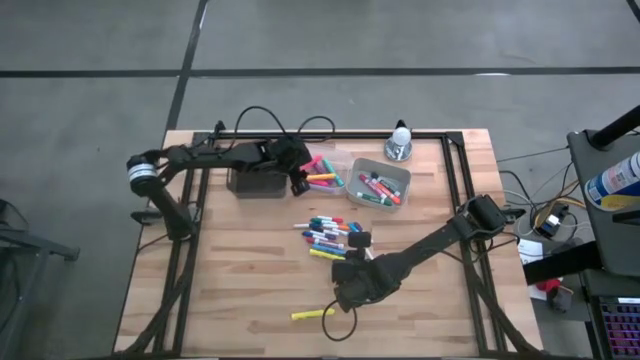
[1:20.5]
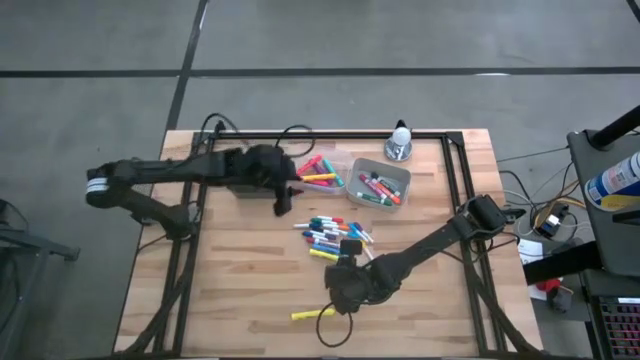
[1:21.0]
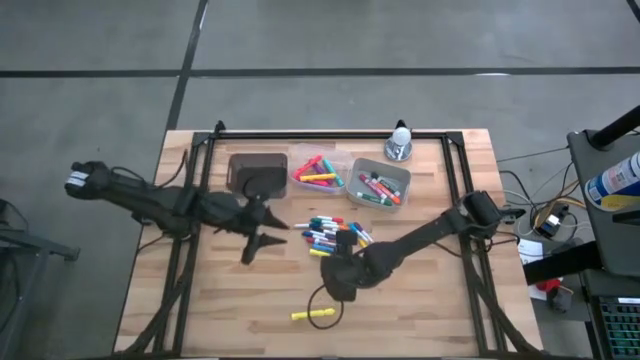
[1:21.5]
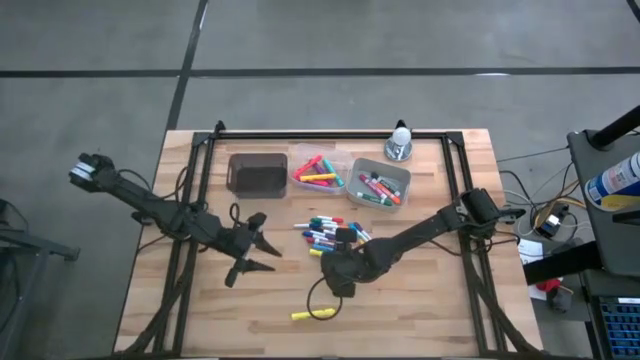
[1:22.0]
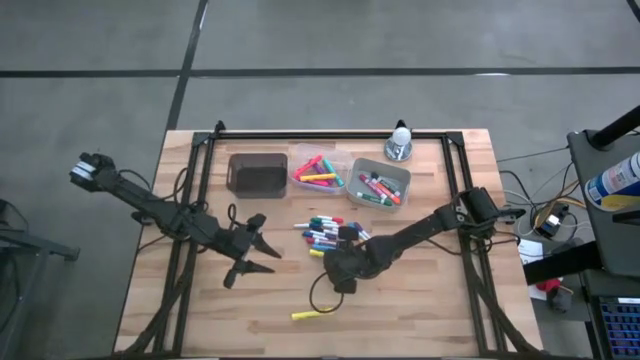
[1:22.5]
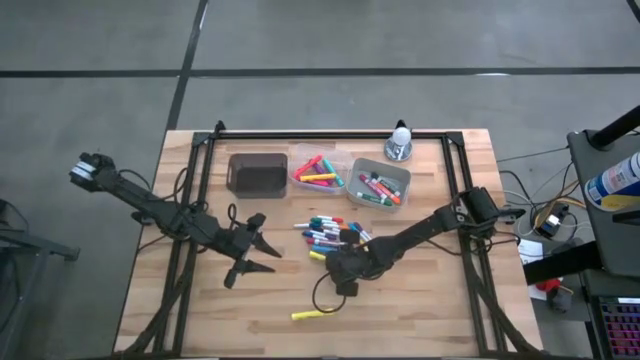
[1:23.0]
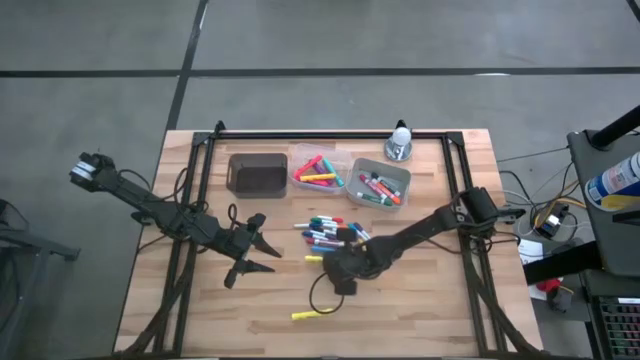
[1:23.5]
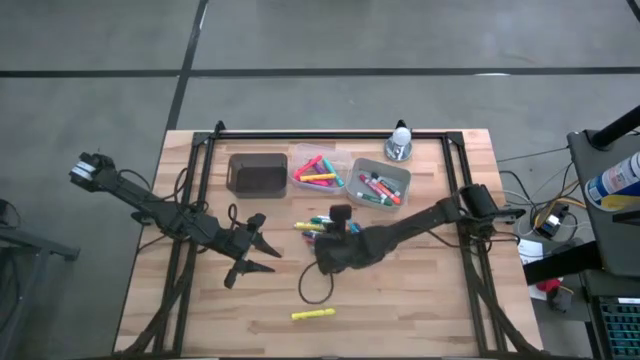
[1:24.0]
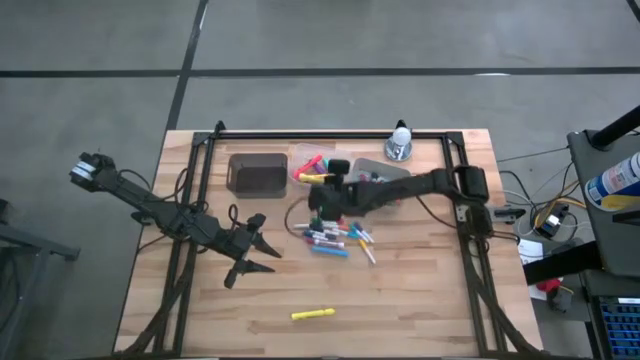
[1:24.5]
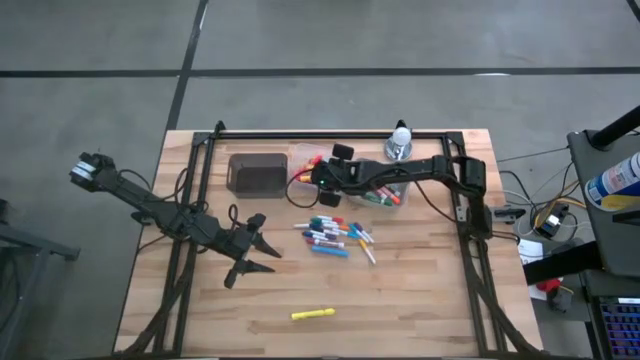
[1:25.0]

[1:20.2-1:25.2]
Task: Pick & Place Markers
Put the yellow highlighter into the transparent bin

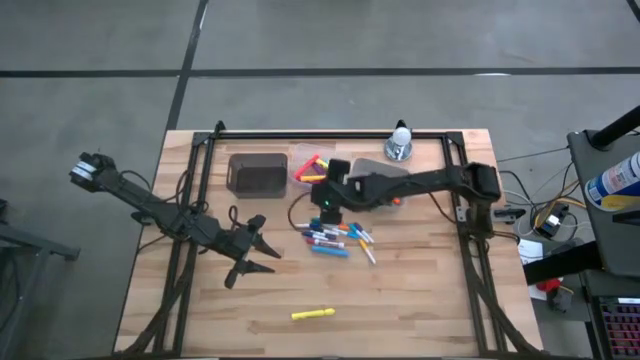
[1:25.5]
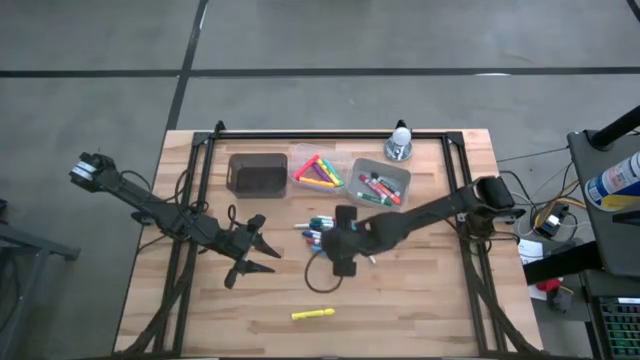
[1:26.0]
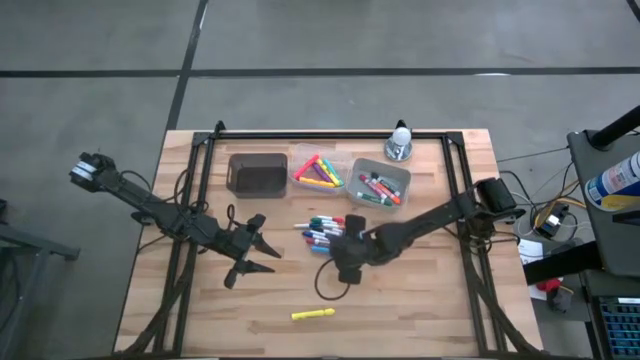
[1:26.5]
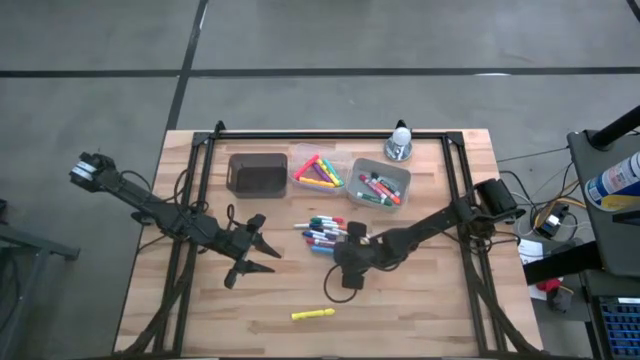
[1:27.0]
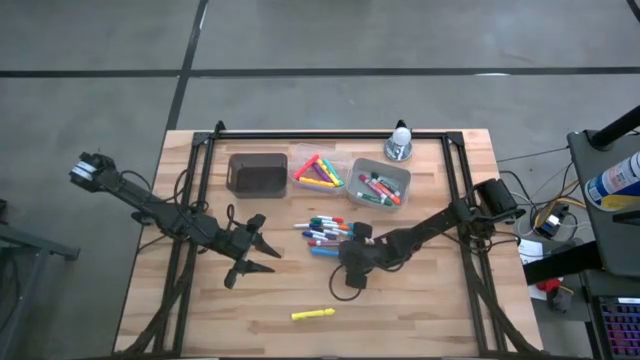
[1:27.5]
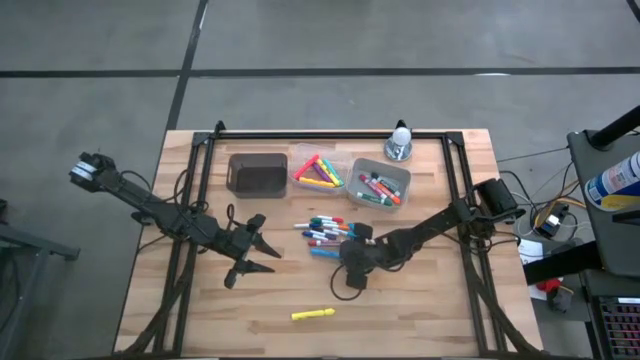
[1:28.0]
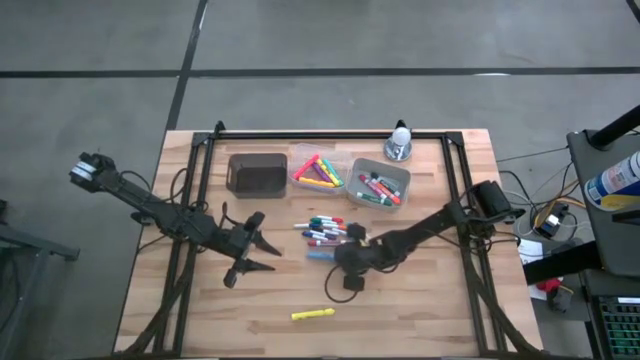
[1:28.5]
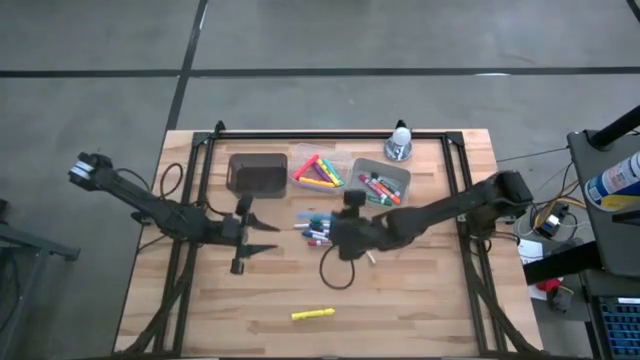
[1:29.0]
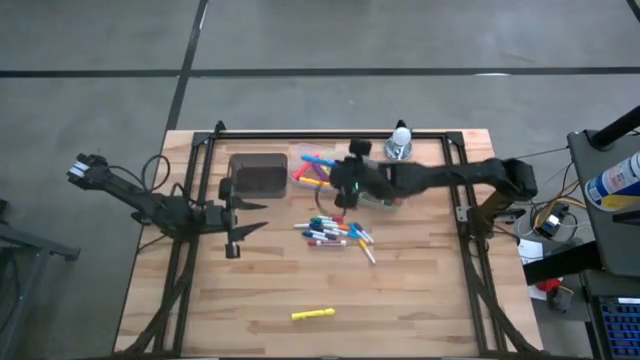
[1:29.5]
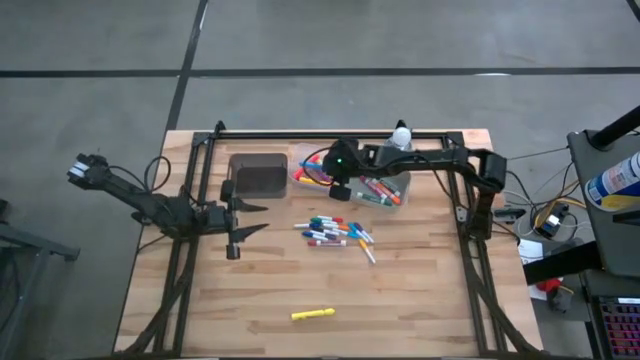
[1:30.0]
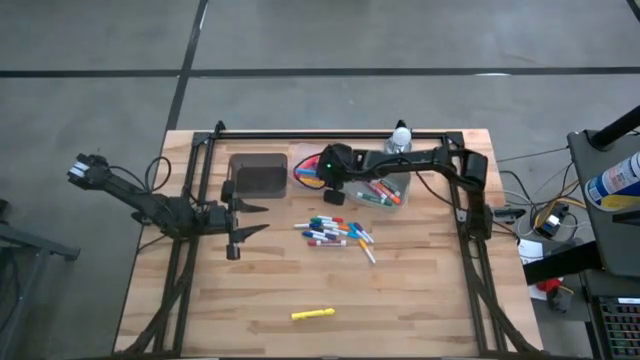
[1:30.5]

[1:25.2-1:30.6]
Put the blue highlighter into the transparent bin

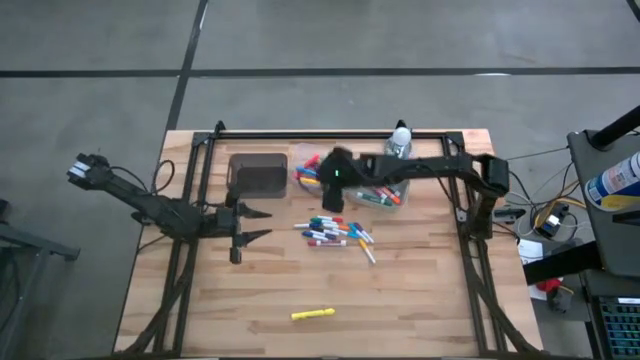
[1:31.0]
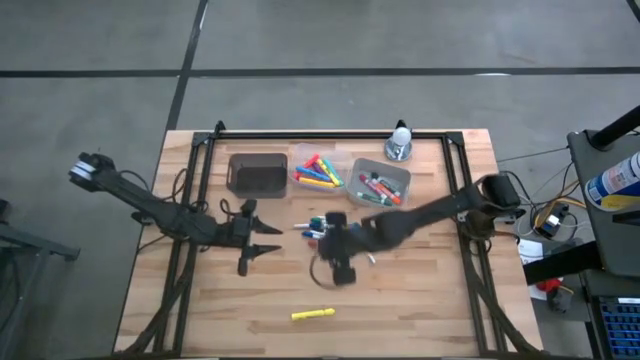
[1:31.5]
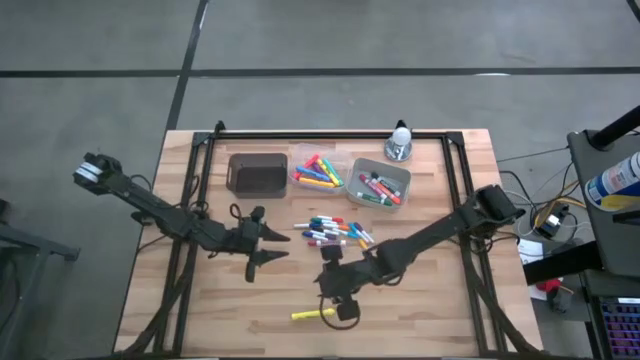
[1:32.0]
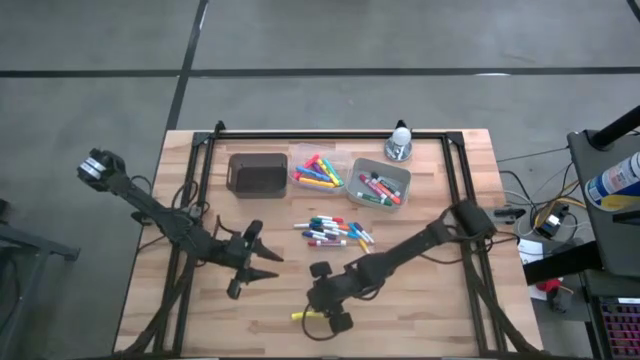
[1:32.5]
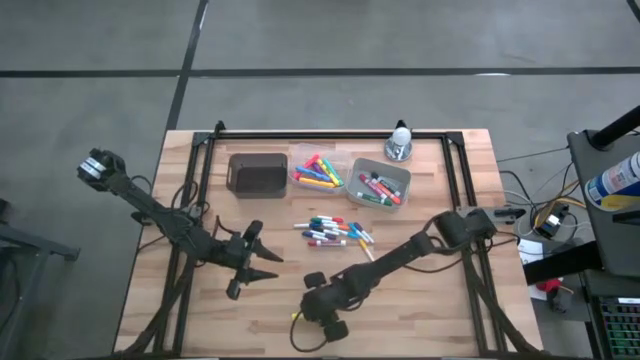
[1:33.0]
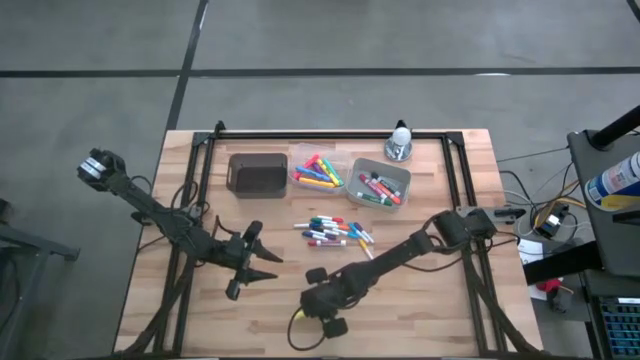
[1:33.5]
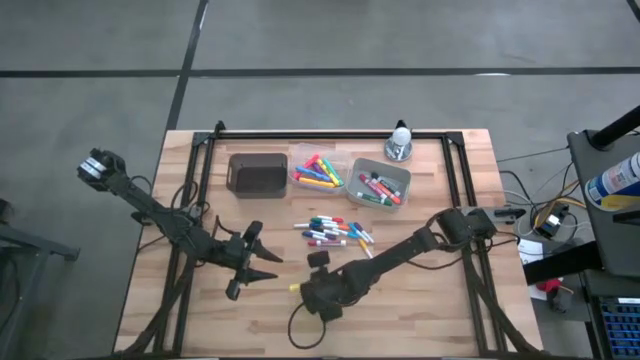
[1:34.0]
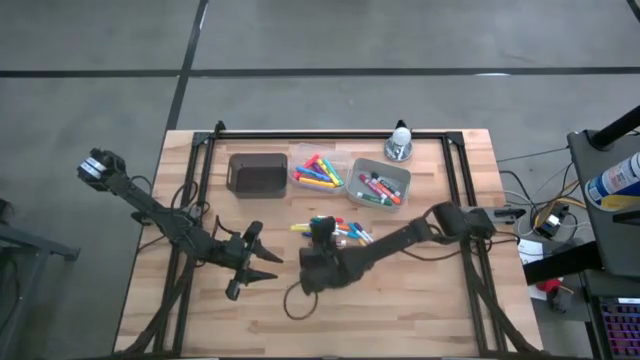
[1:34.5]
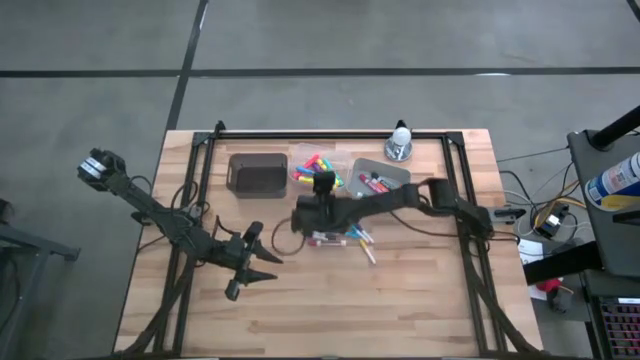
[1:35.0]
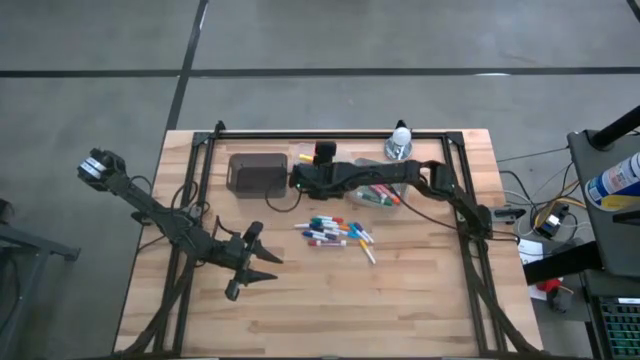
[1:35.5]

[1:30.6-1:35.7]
Put the yellow highlighter into the transparent bin

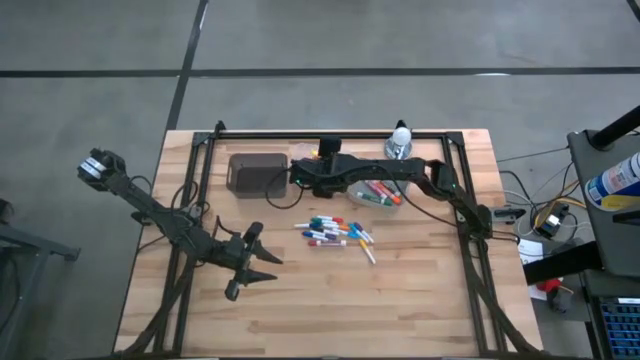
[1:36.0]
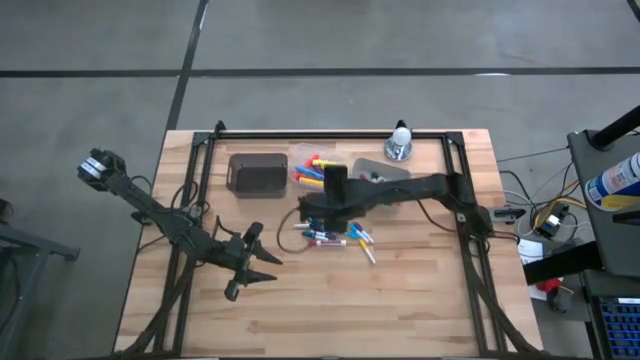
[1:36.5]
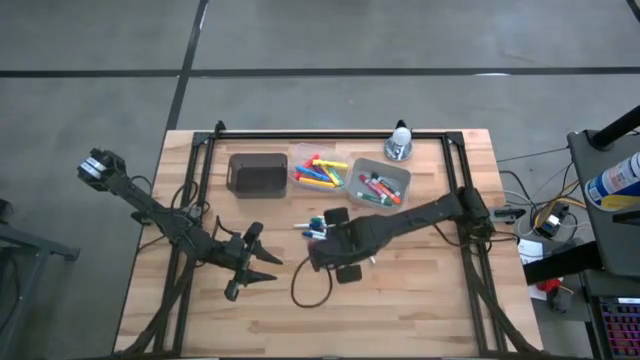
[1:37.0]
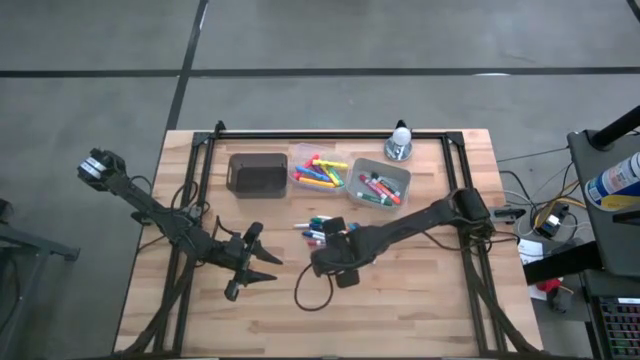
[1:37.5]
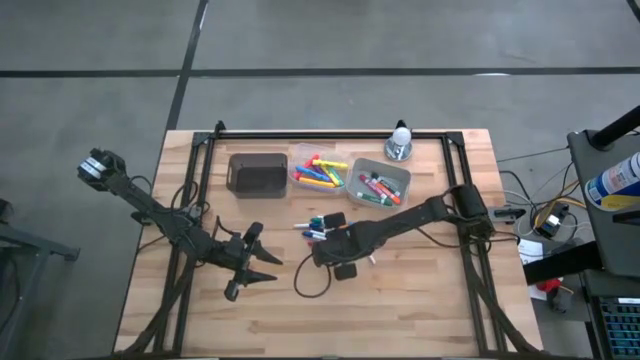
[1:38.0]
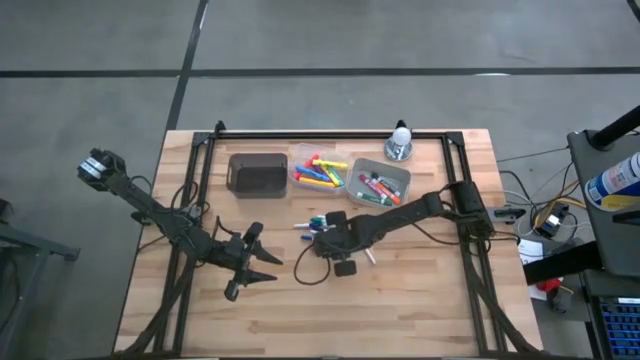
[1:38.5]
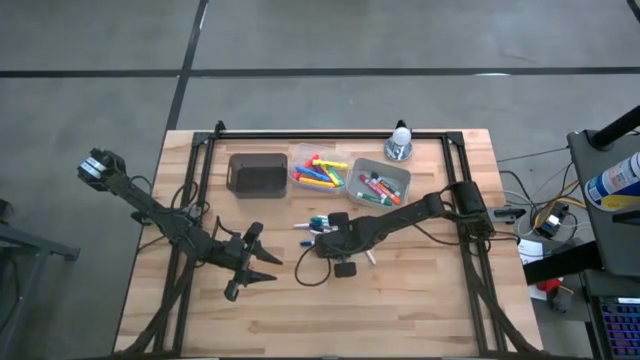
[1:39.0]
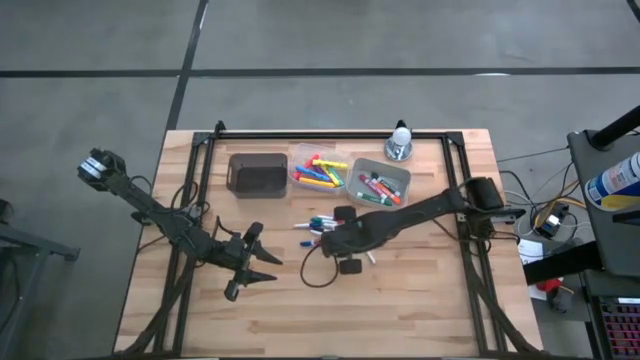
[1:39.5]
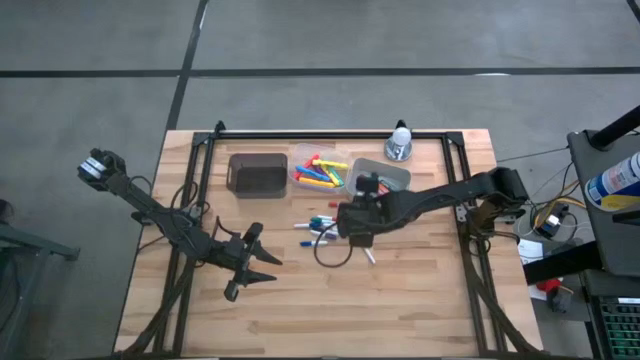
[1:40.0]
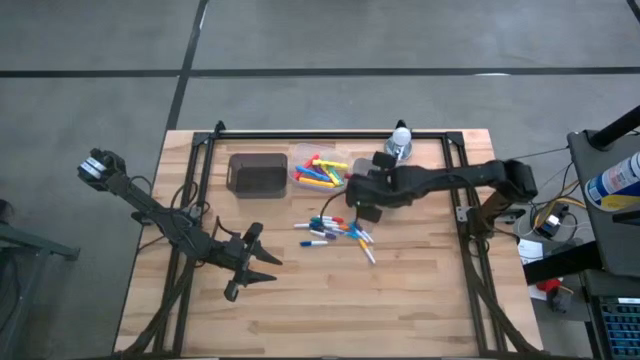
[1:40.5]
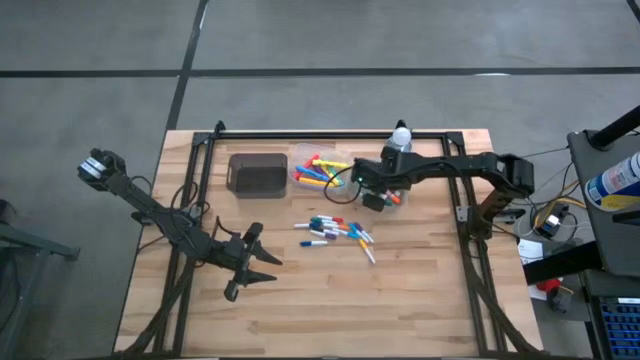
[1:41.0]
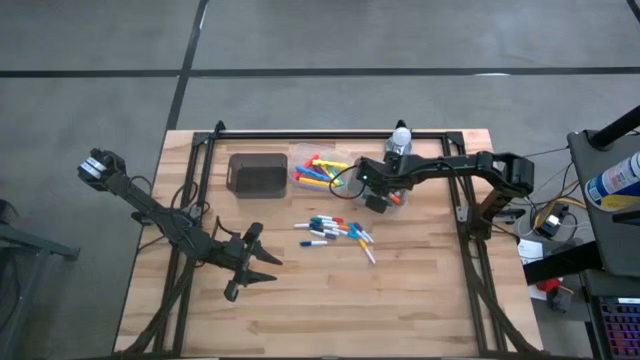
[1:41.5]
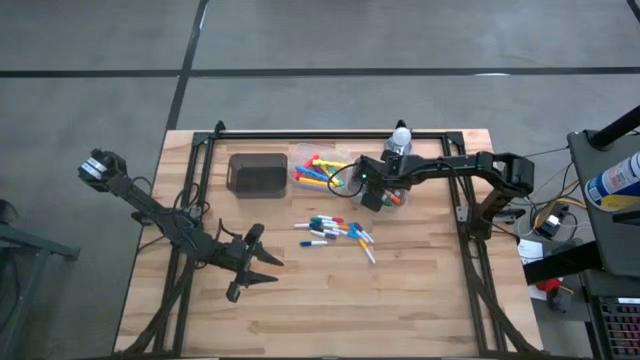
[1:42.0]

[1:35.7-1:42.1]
Put the red dry erase marker into the gray bin
